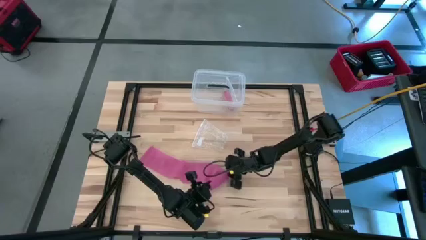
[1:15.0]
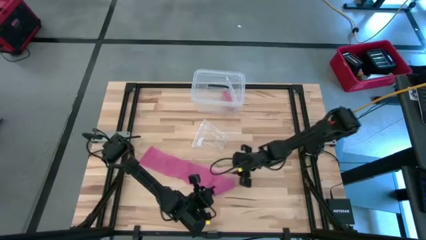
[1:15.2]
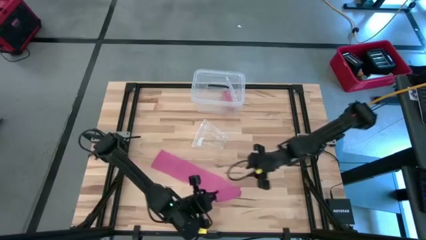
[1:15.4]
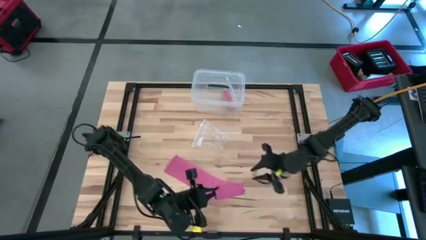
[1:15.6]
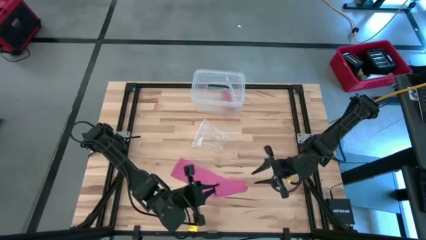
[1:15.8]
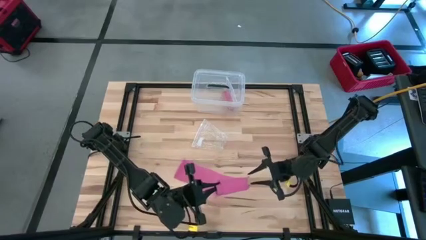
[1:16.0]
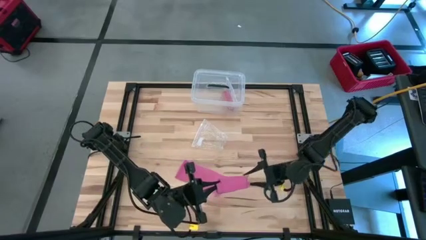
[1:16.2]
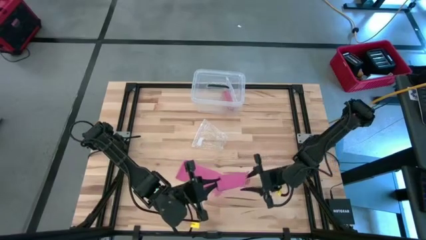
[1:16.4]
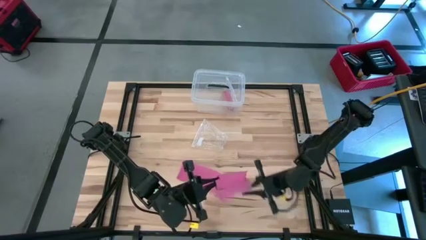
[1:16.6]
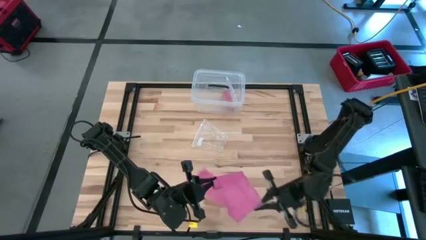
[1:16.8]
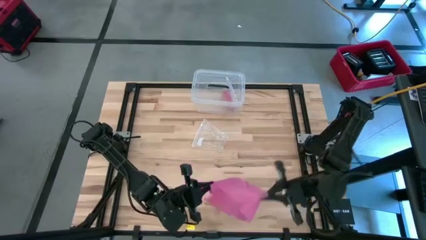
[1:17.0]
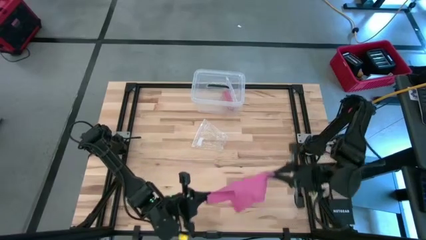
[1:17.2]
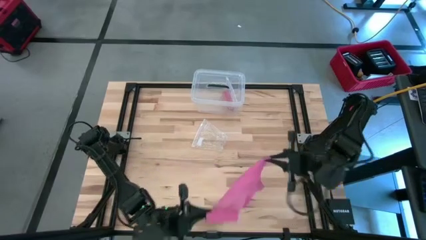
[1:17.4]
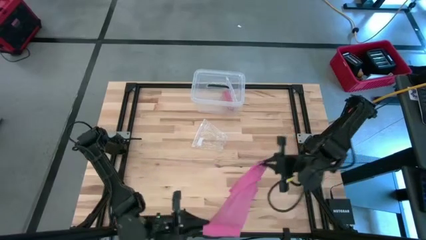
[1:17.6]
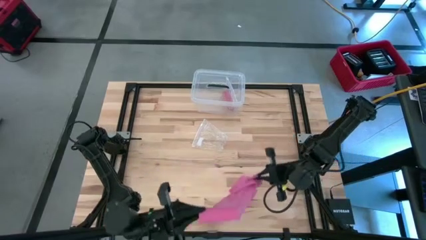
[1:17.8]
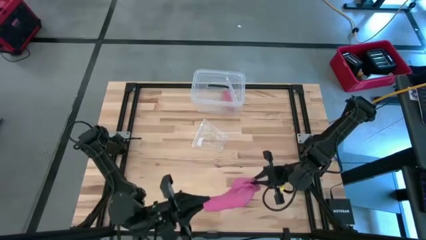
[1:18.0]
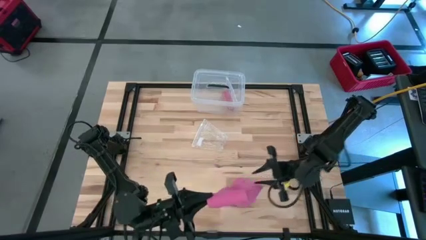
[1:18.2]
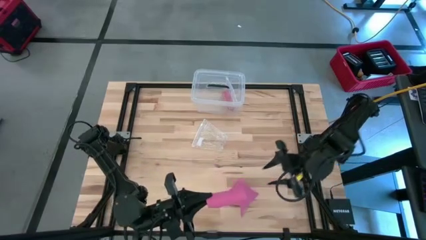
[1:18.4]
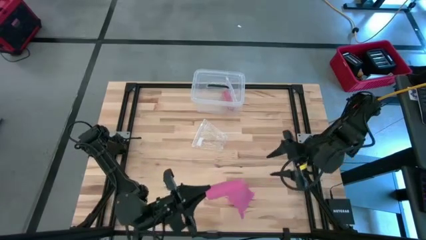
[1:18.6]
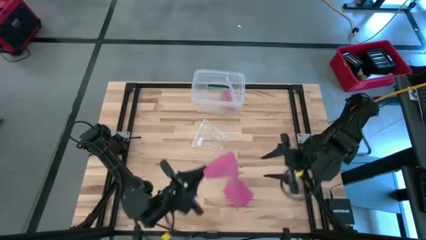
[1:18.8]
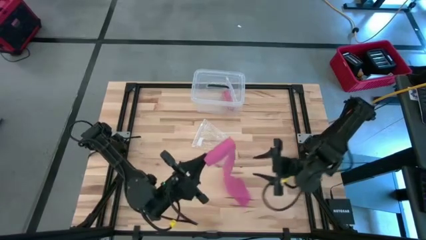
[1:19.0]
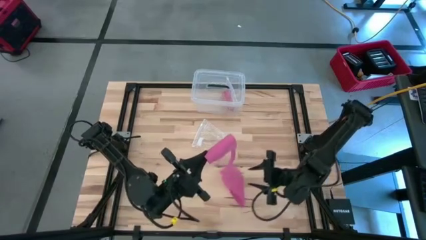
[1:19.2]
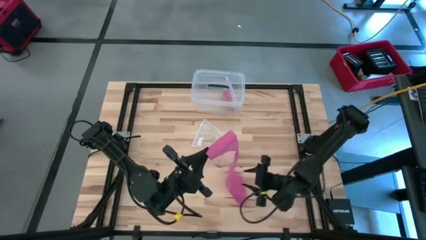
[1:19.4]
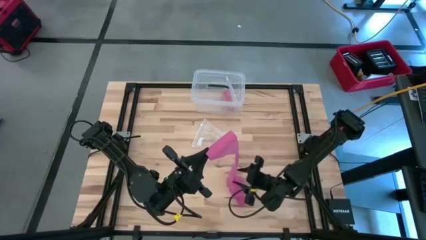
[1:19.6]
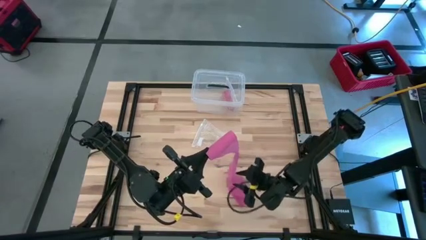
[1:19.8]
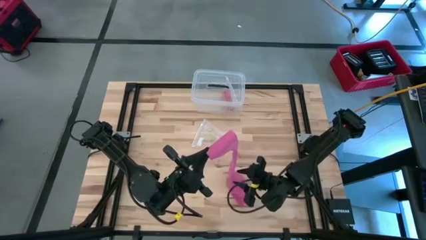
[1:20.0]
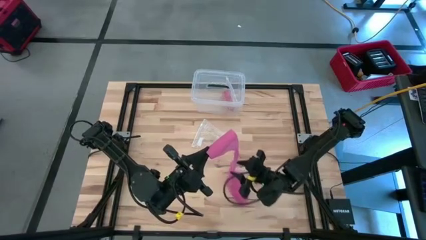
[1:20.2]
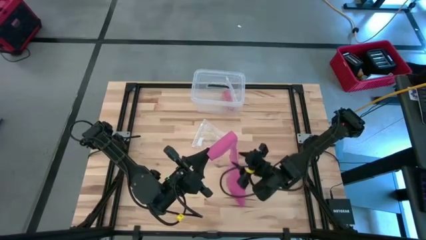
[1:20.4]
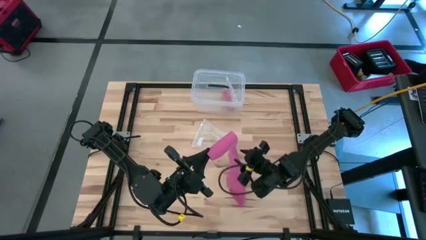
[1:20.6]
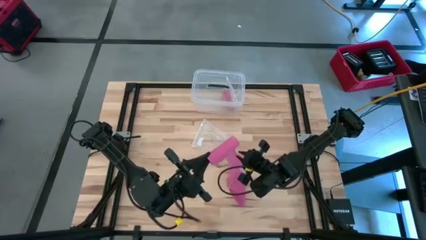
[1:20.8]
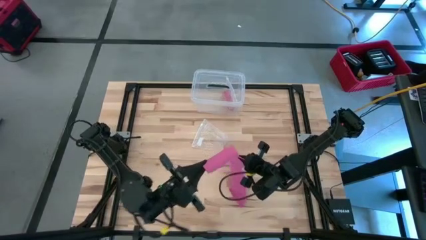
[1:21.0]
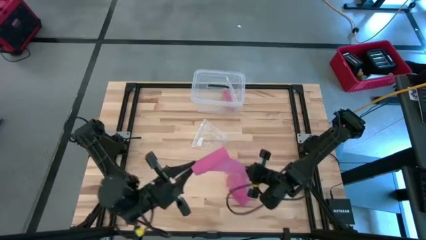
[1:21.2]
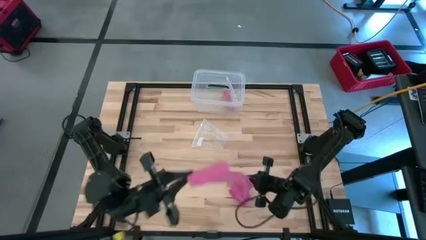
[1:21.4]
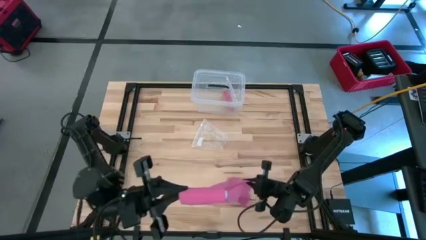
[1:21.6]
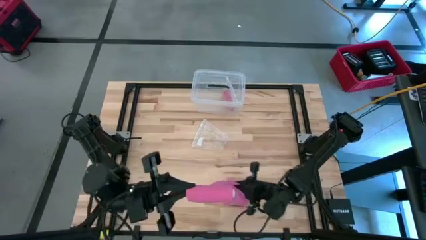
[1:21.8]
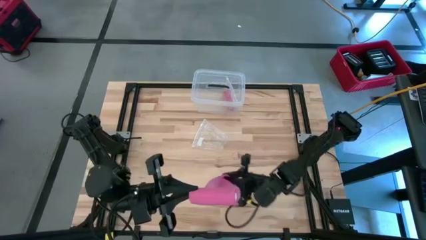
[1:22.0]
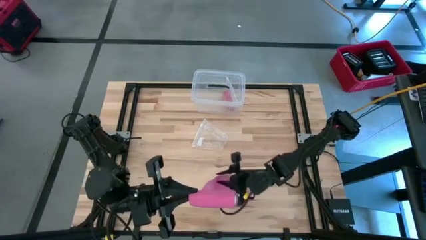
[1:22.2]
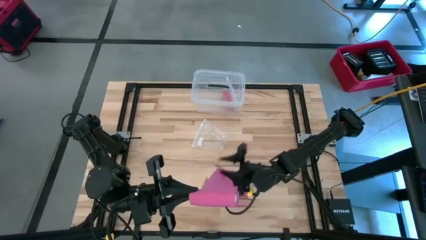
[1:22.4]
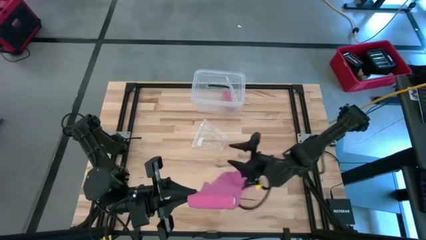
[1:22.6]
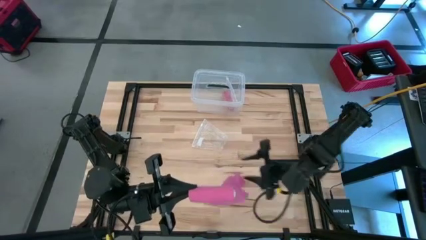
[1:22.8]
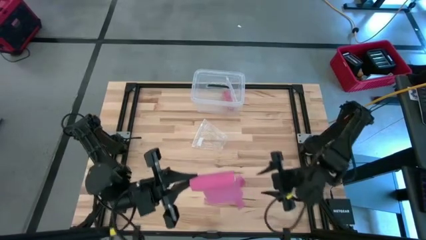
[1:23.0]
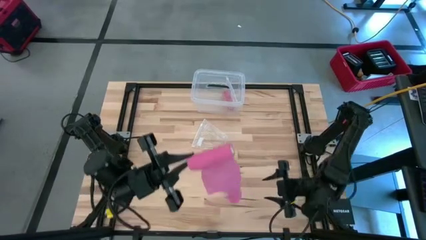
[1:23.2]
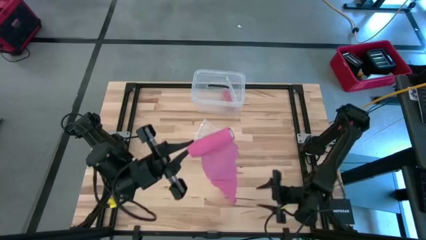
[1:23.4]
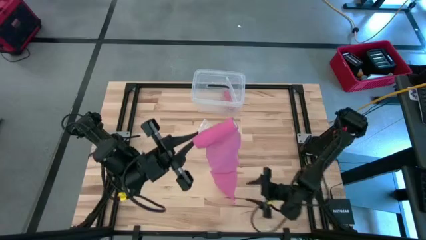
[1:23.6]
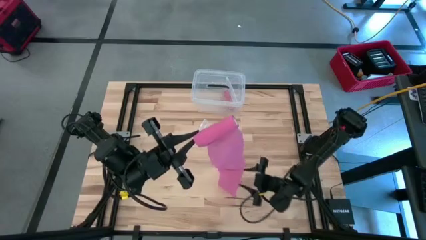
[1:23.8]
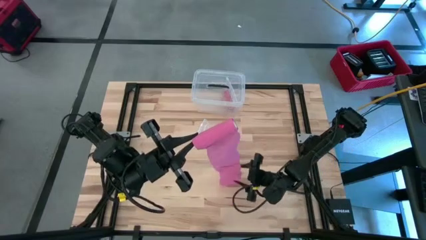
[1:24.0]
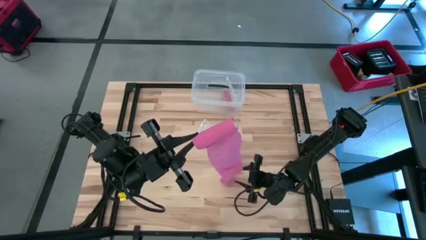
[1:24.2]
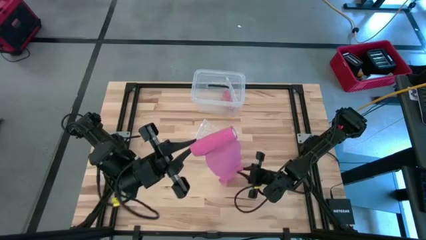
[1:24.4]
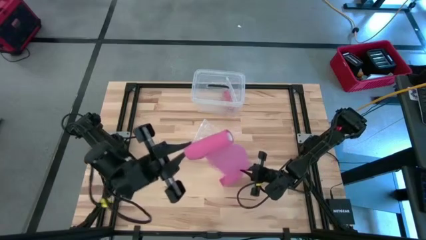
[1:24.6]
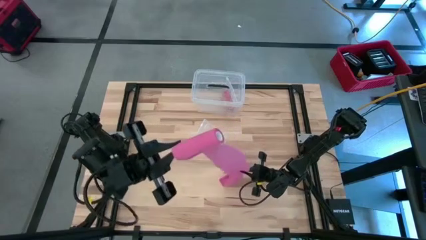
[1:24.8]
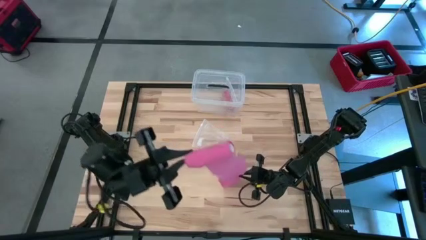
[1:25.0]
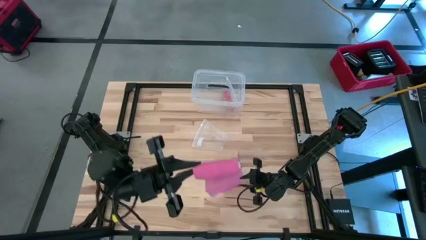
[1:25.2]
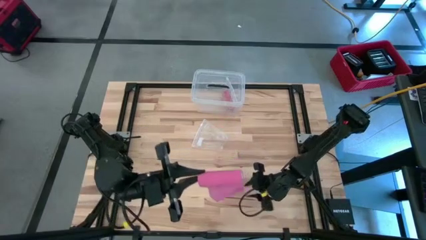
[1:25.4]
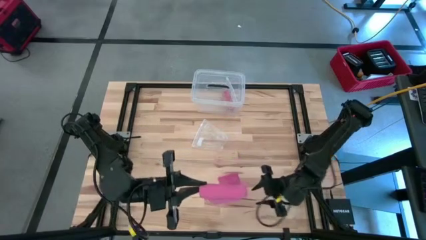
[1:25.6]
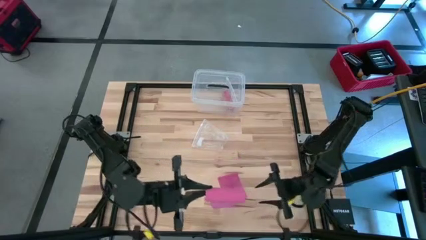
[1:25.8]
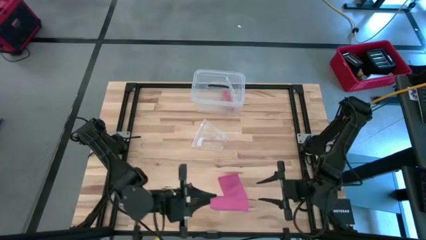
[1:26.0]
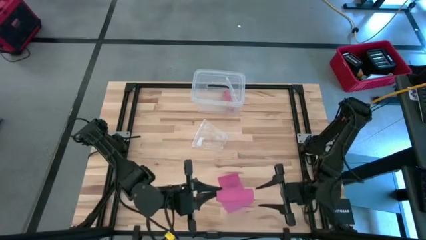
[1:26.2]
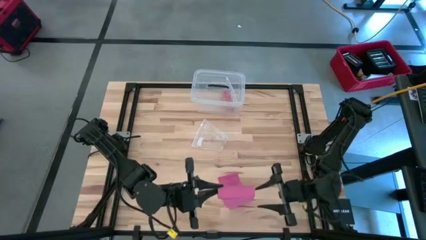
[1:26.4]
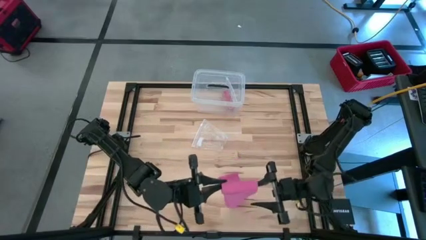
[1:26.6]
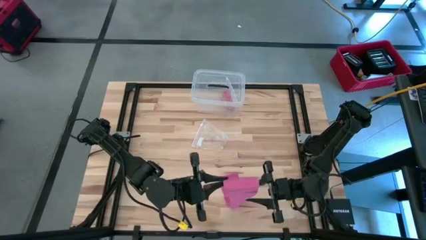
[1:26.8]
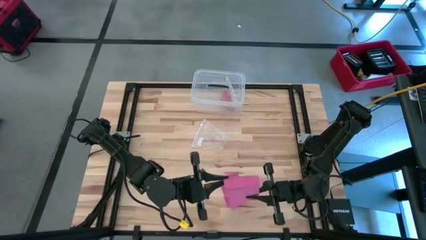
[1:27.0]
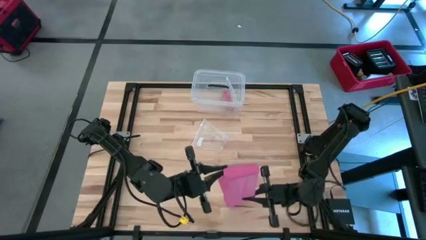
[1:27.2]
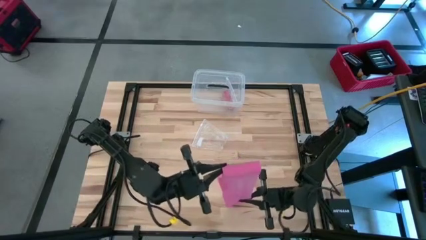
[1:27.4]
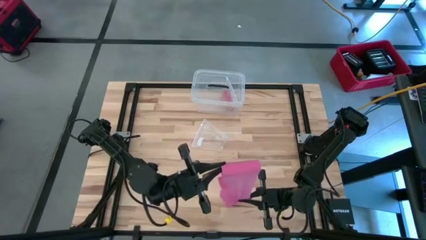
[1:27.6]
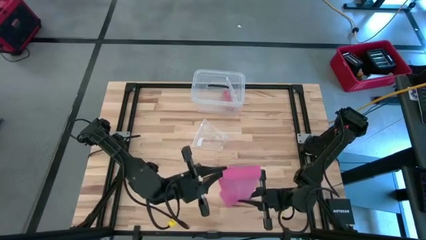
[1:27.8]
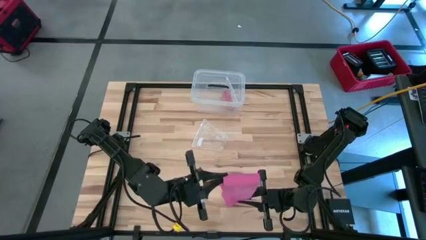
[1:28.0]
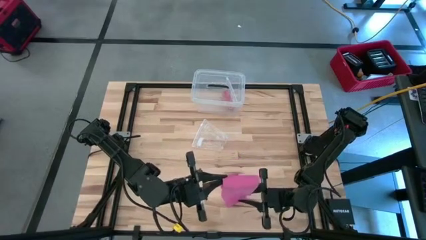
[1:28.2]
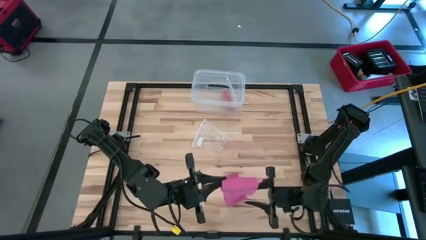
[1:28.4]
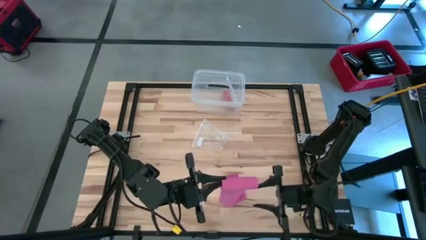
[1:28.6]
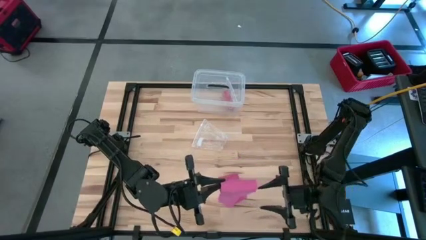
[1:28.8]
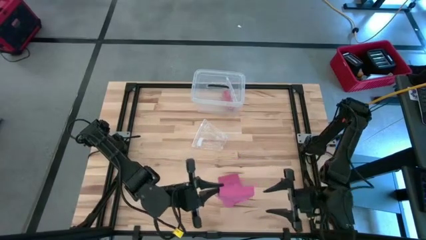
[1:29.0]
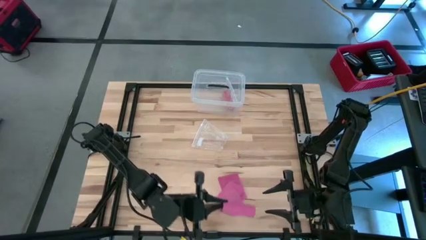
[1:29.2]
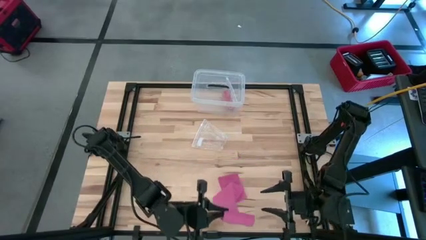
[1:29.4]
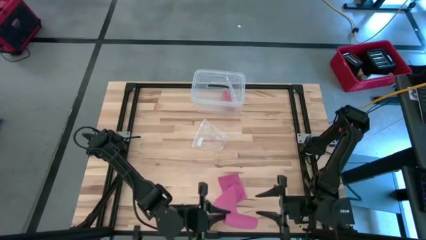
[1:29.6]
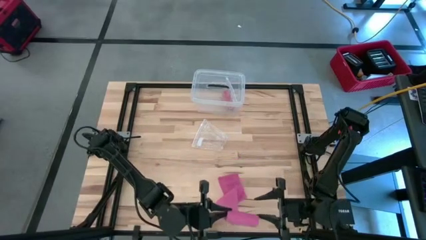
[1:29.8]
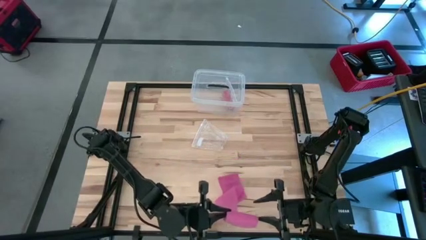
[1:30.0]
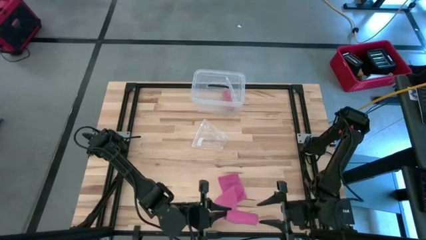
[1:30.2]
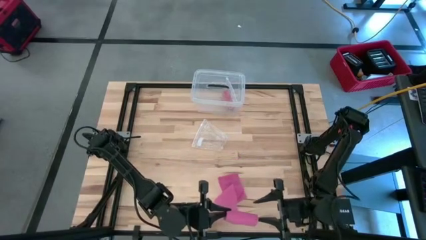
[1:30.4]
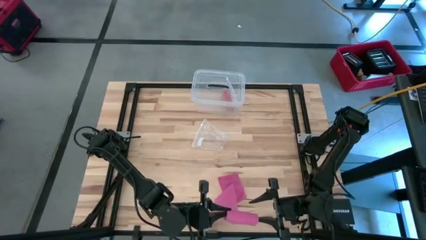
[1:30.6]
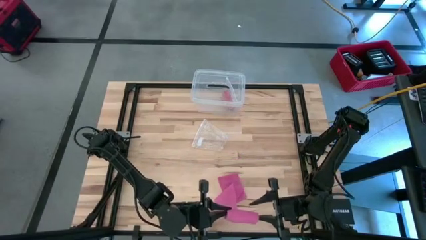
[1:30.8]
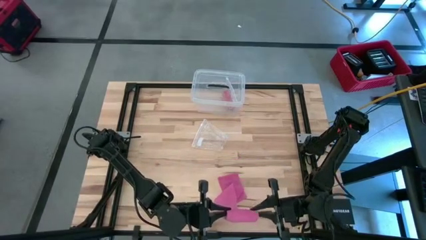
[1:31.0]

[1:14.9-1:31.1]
Task: Roll bandage
Roll the pink bandage
